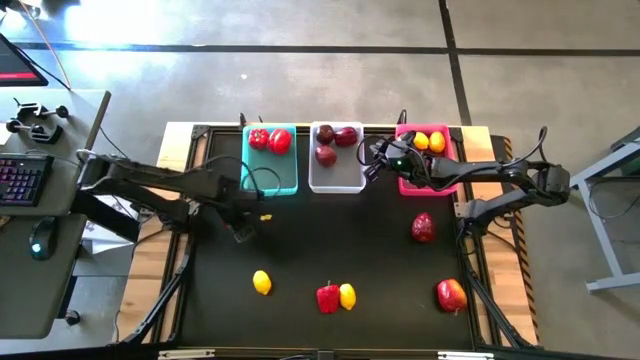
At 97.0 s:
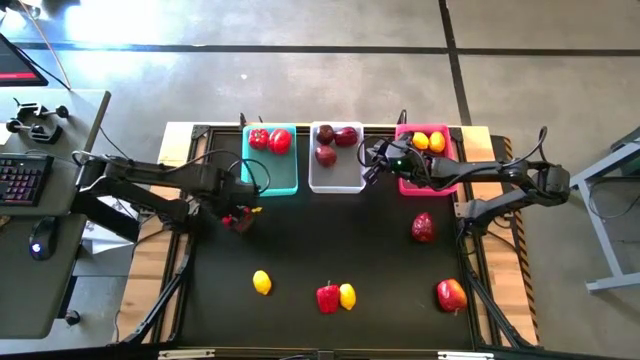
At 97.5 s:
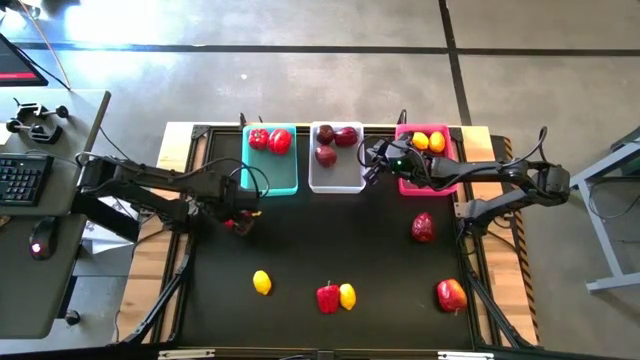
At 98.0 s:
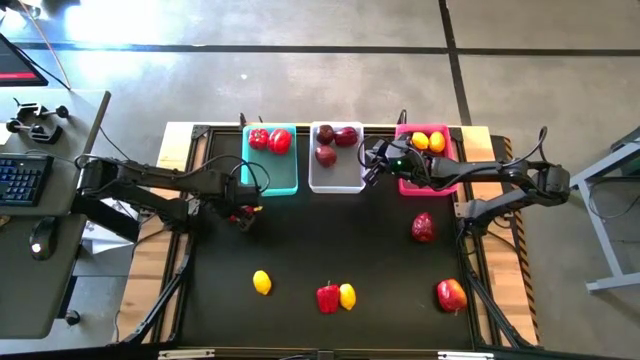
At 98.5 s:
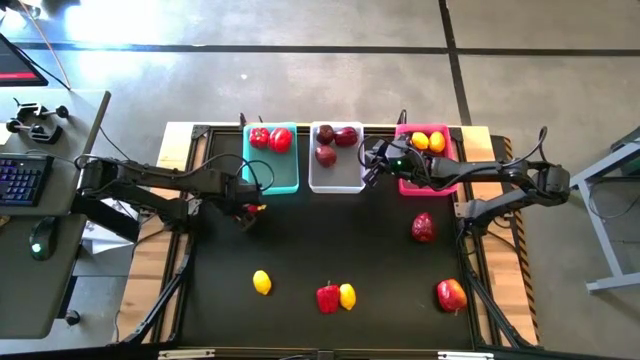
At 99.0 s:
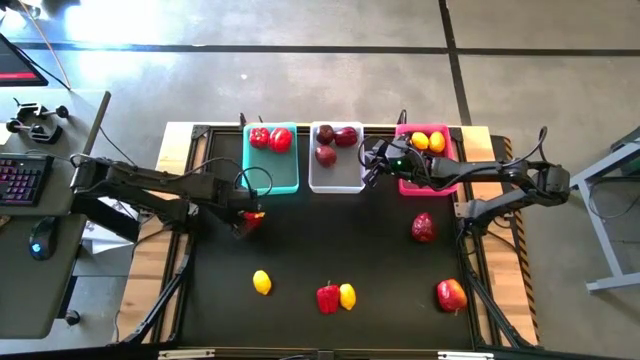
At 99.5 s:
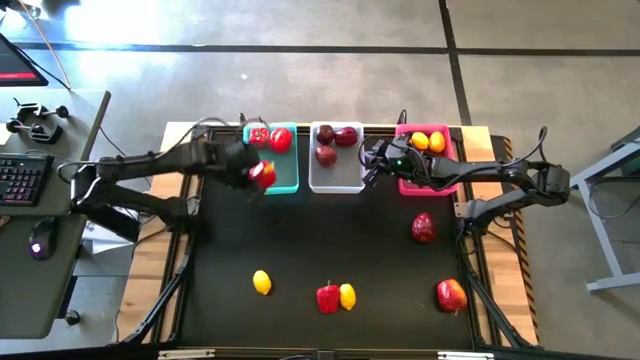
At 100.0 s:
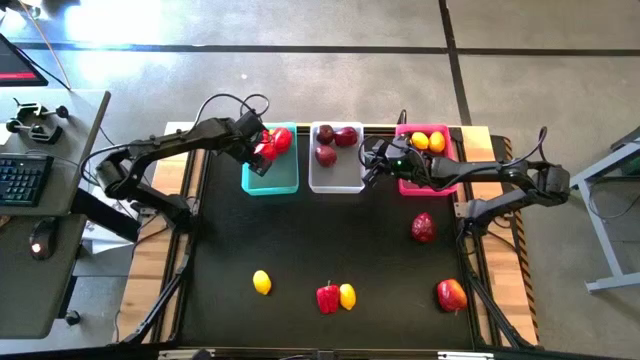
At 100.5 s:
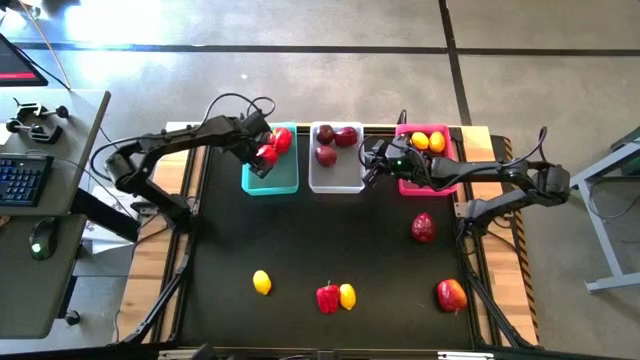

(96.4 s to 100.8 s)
Task: Sort produce into baskets
Put the bell pepper into the green bin

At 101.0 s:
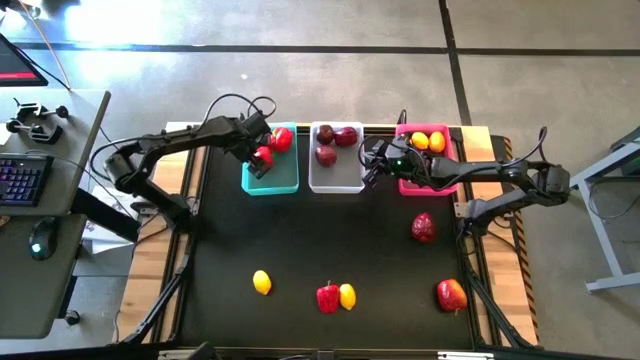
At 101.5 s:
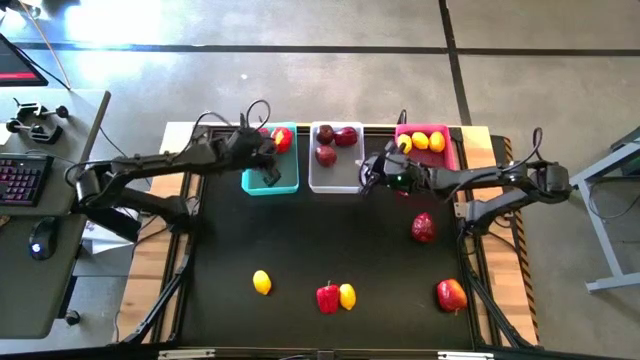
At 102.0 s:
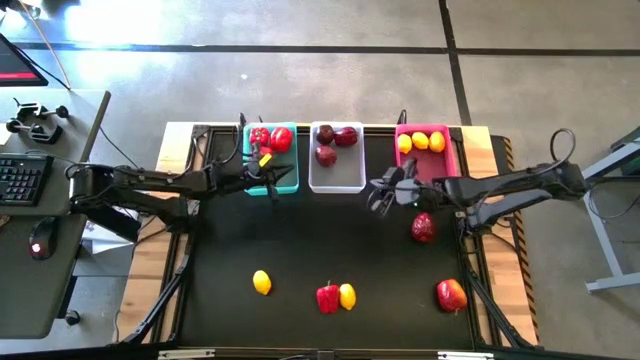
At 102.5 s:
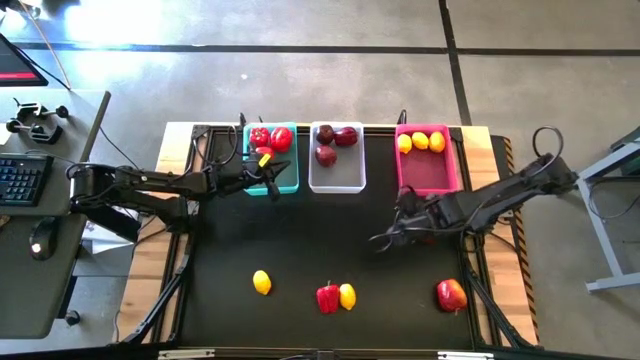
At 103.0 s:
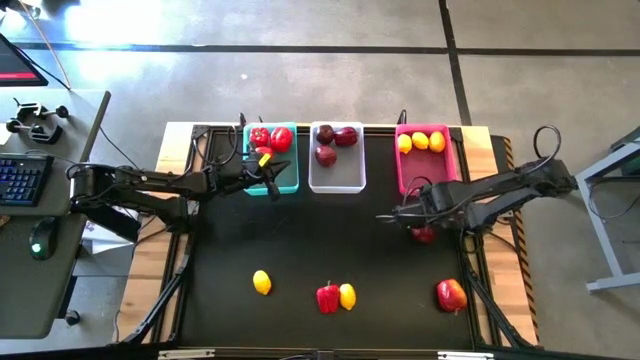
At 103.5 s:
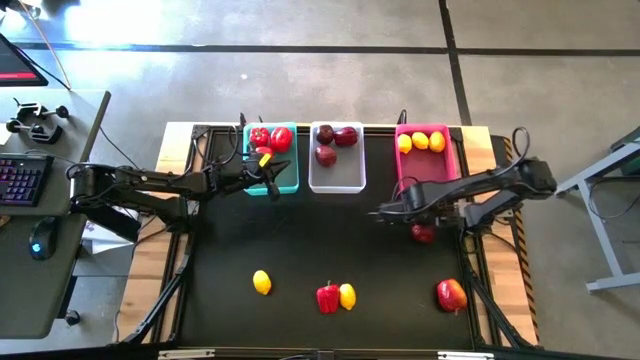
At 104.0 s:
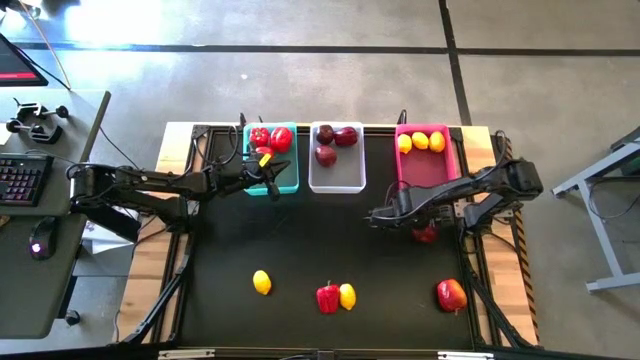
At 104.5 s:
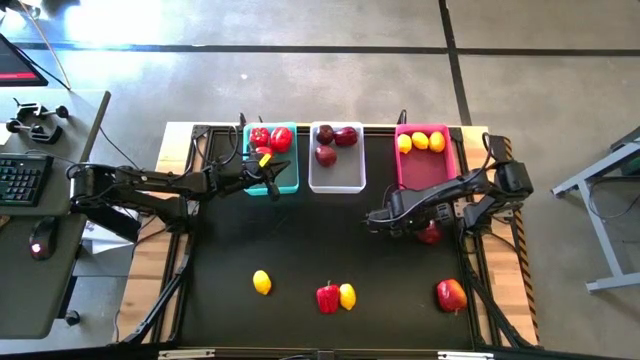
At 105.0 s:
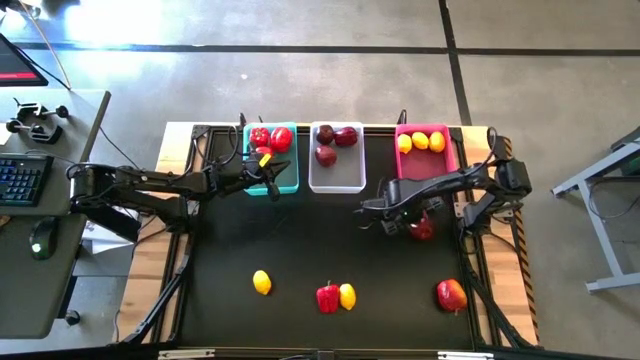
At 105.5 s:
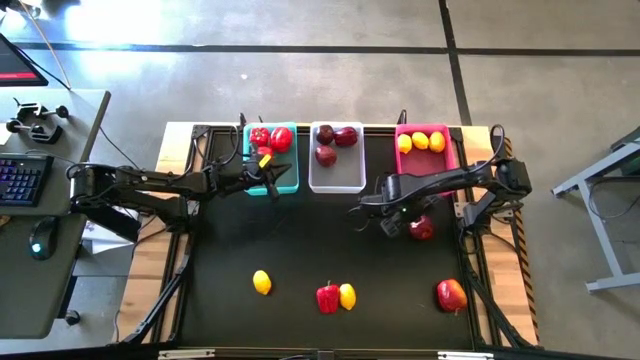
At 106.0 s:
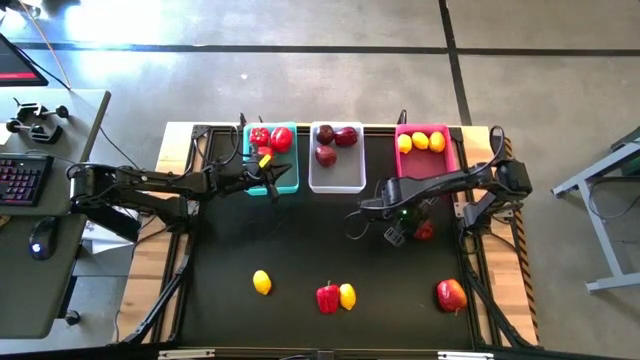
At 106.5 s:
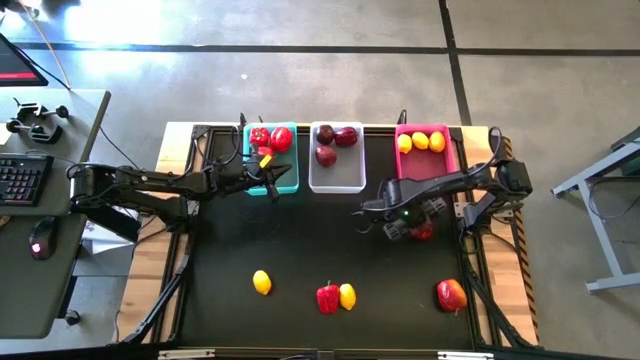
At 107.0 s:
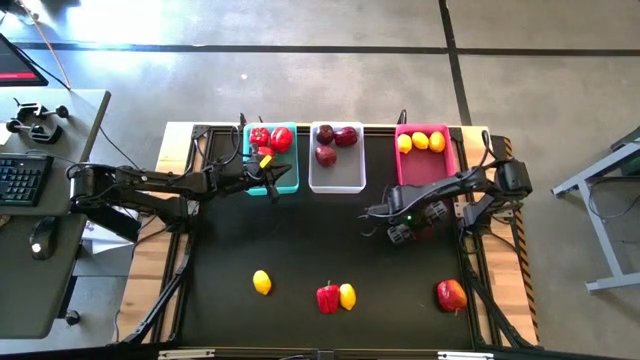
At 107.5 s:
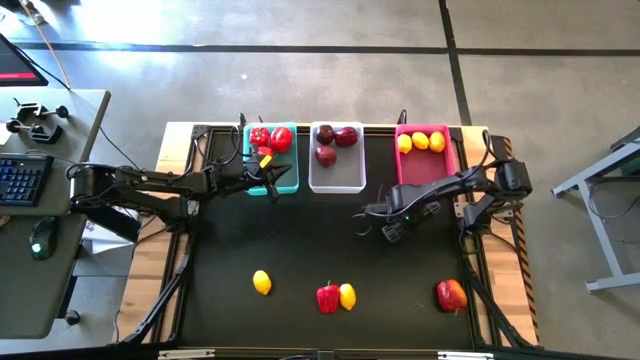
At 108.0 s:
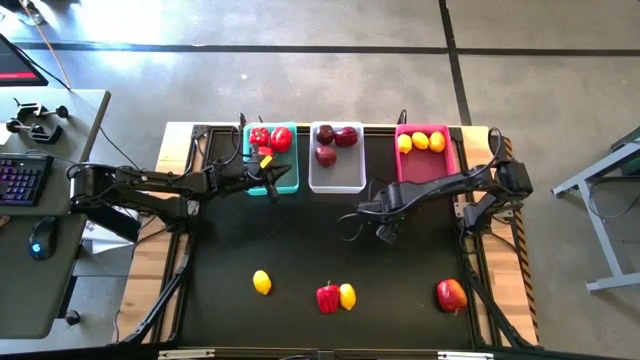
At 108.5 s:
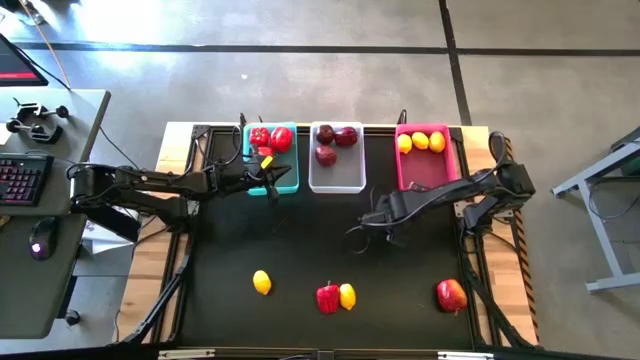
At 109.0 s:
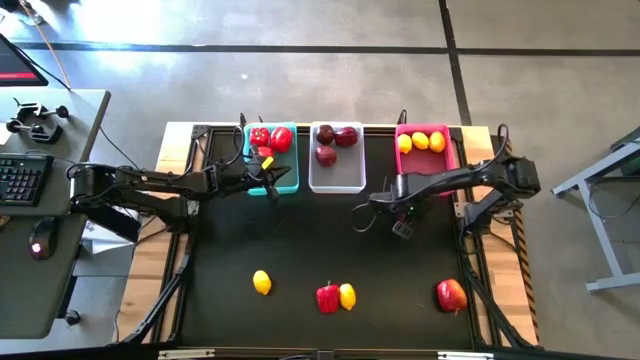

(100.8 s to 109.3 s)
Put the apple into the white bin

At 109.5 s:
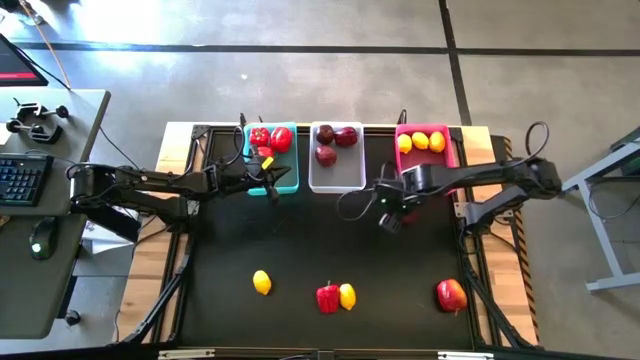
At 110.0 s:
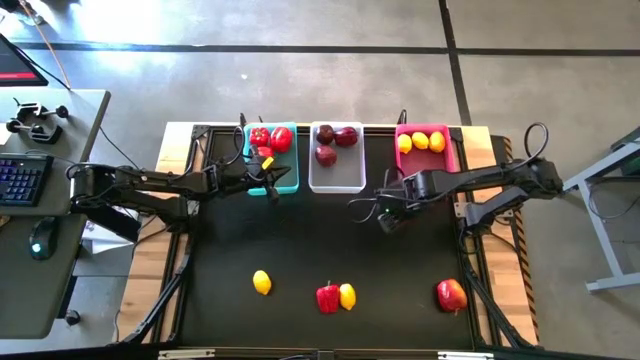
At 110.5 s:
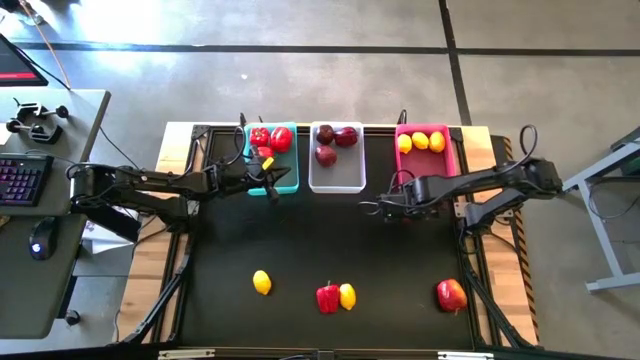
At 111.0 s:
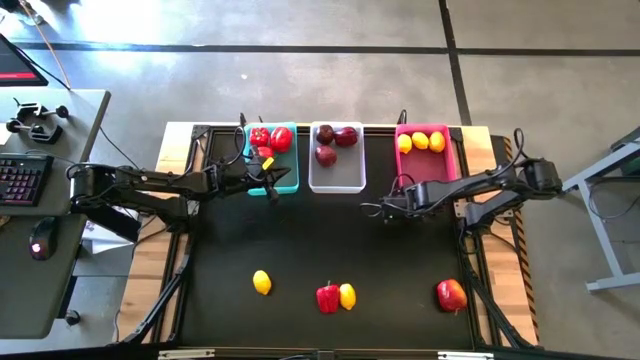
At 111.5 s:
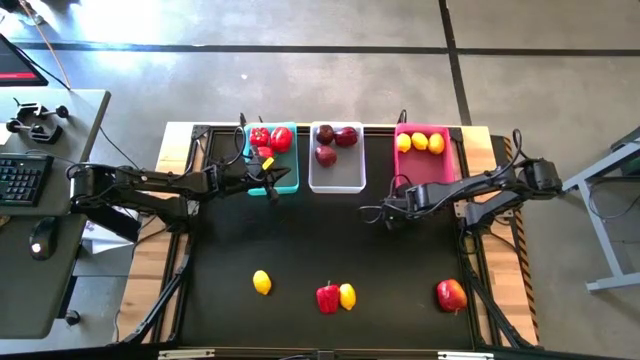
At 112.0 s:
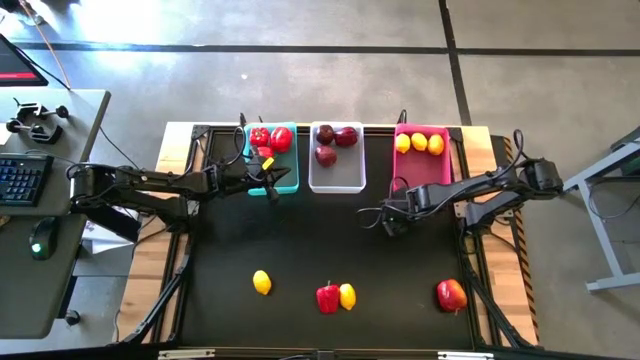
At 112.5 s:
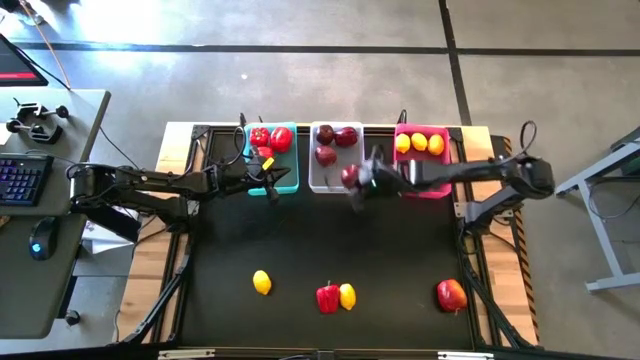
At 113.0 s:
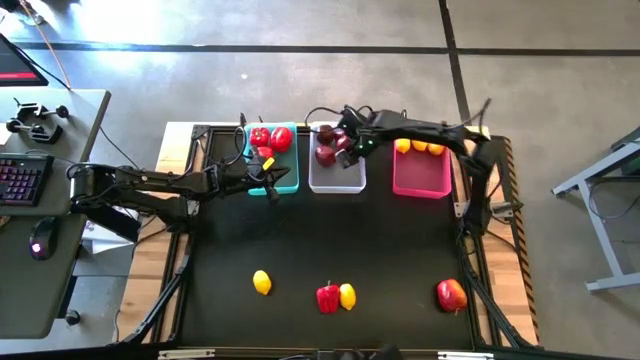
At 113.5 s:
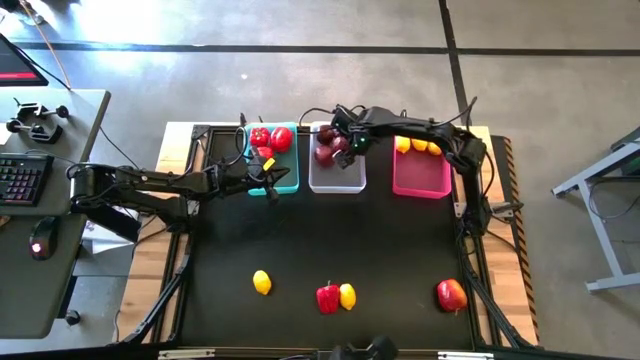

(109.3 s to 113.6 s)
Put the apple into the white bin

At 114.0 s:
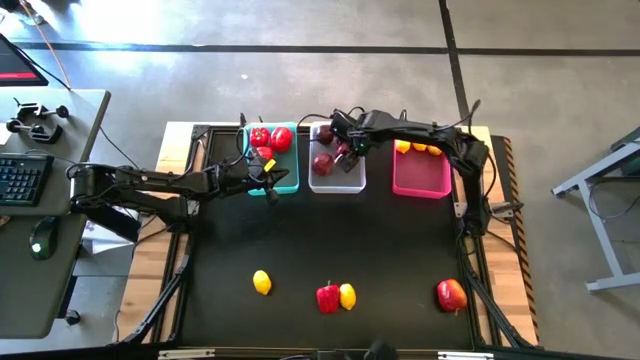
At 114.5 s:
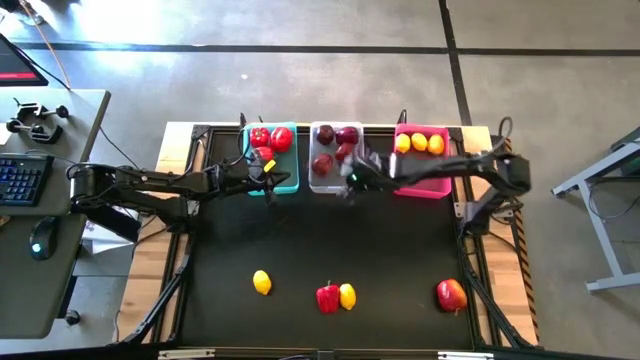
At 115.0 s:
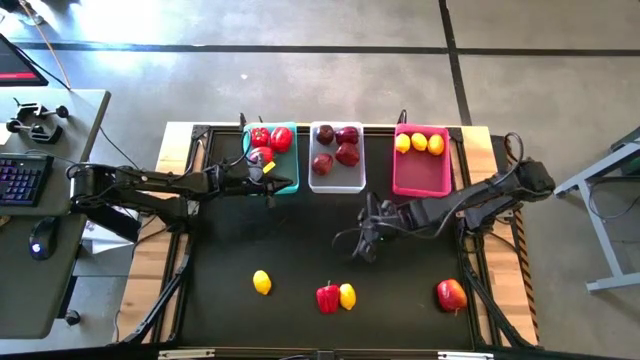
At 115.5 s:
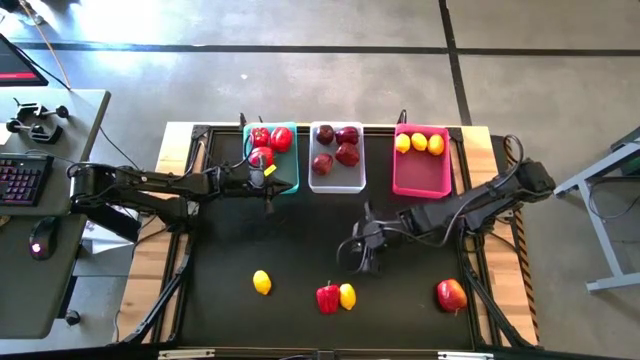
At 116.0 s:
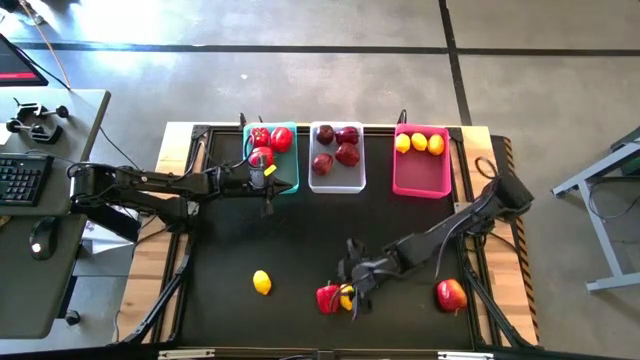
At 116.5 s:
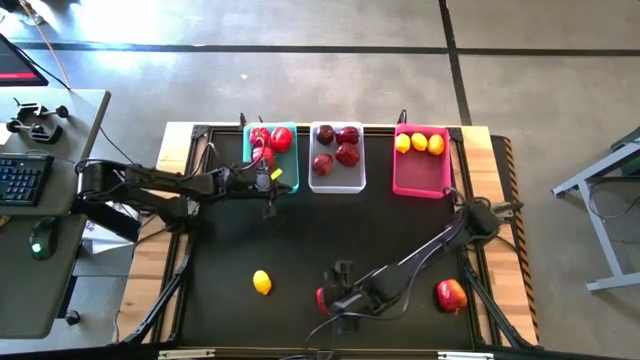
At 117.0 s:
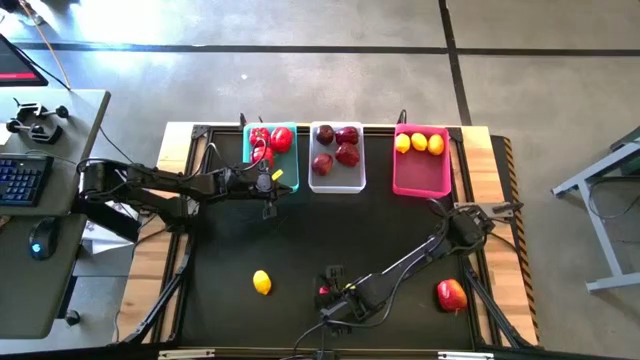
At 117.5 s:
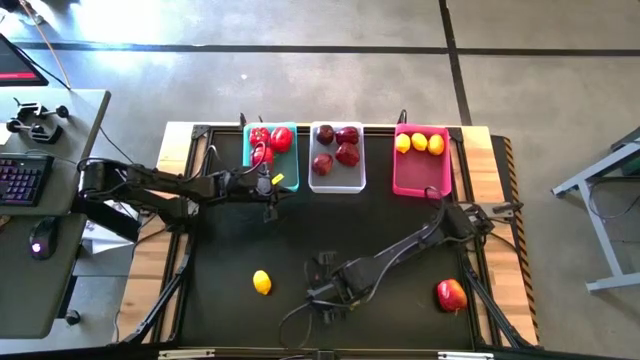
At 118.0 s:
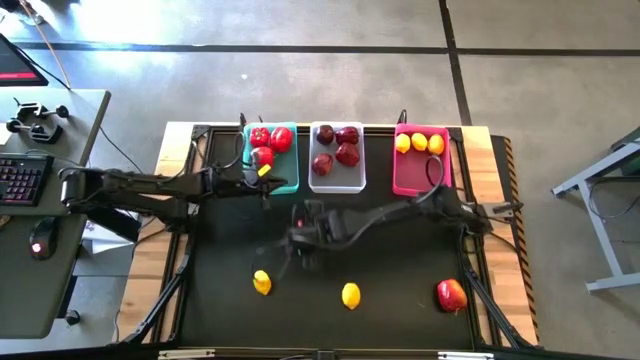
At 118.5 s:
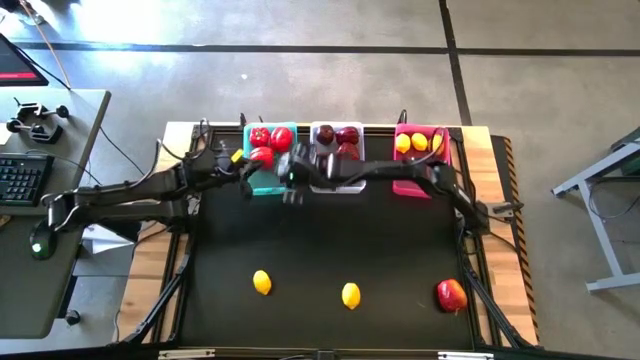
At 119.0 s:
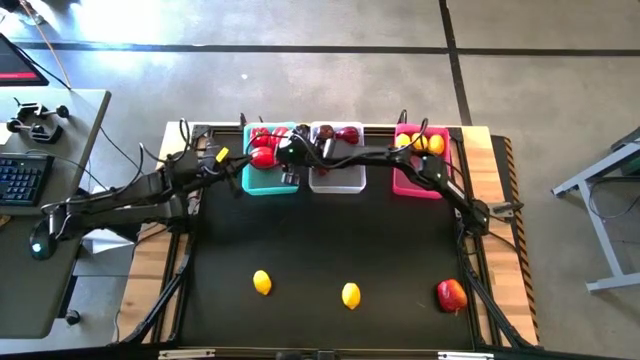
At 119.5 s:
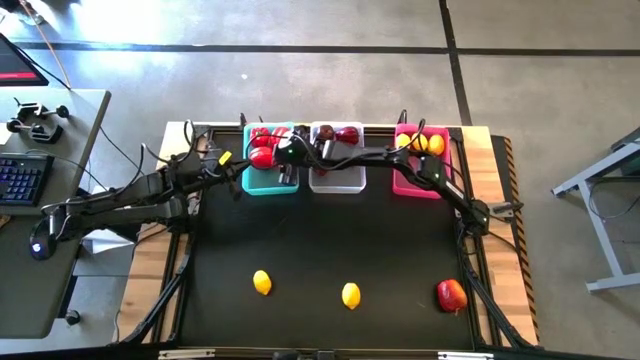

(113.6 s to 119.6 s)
Put the bell pepper into the green bin
